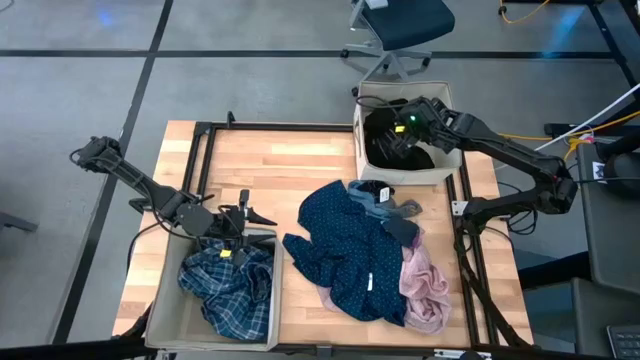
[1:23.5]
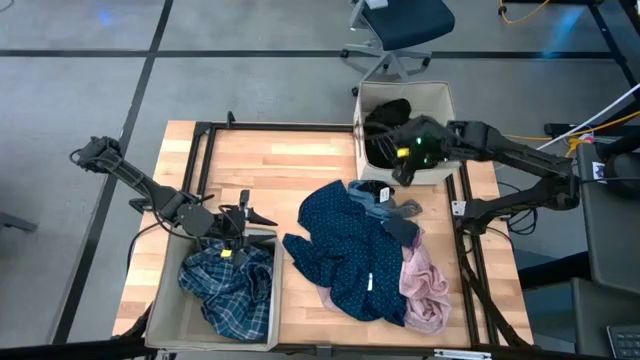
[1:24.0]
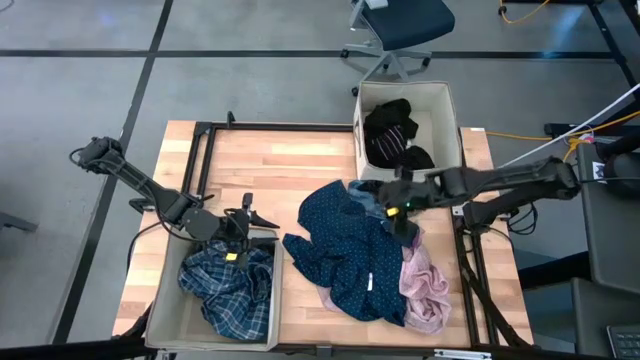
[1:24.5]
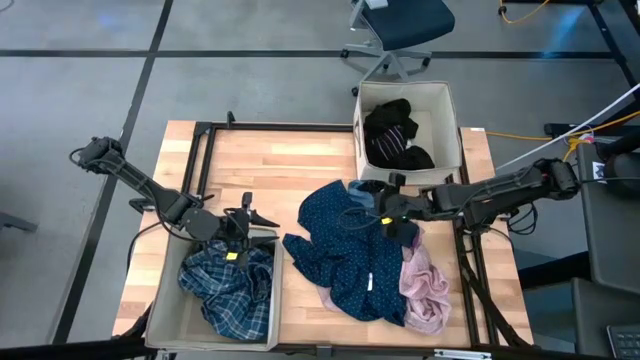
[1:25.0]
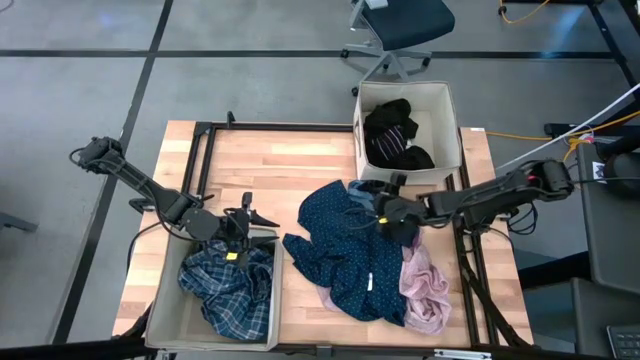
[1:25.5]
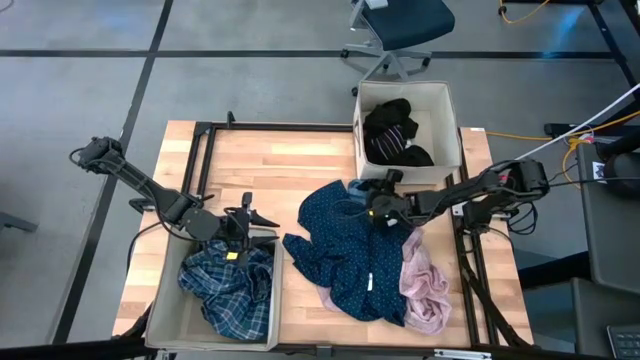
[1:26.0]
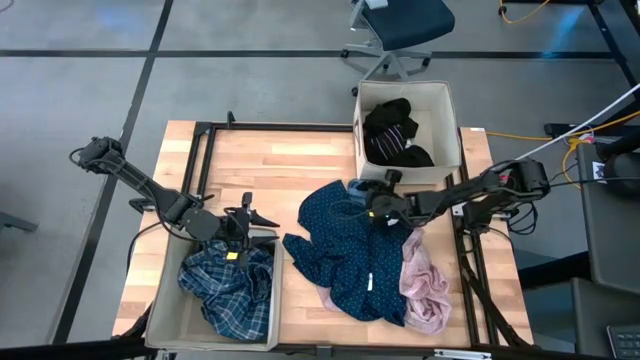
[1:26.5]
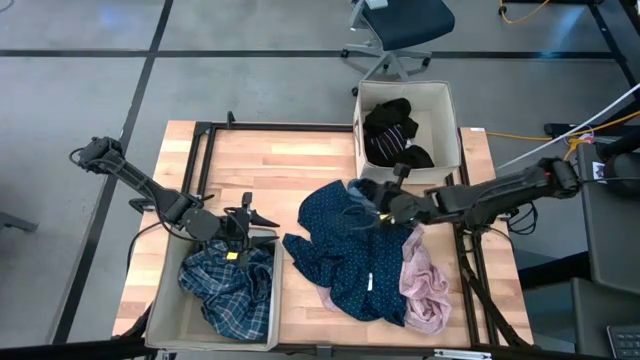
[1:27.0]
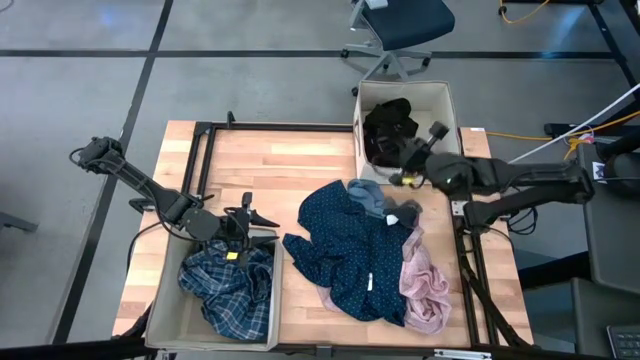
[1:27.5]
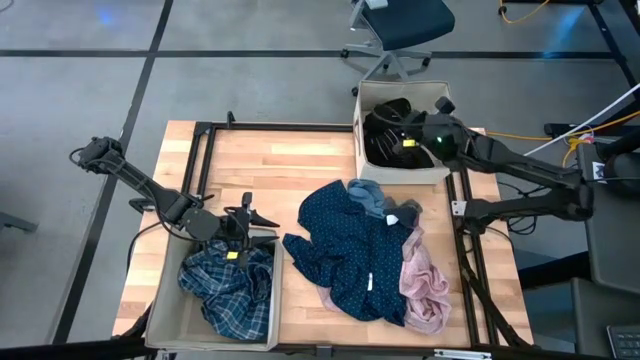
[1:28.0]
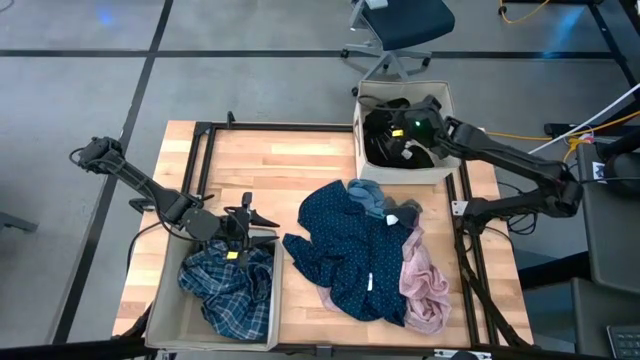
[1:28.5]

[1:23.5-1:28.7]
Task: Sort clothes
Put the black sock into the top laundry organizer

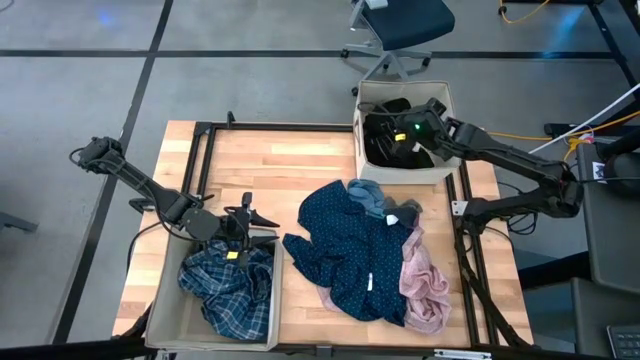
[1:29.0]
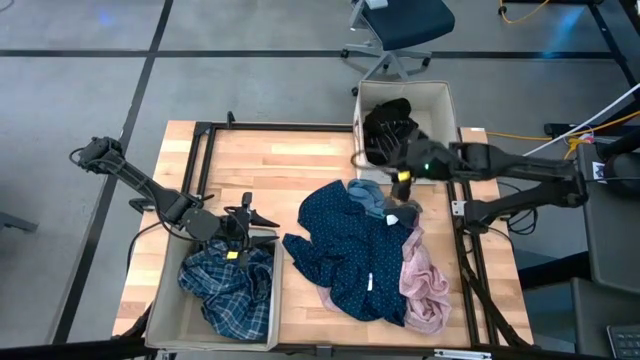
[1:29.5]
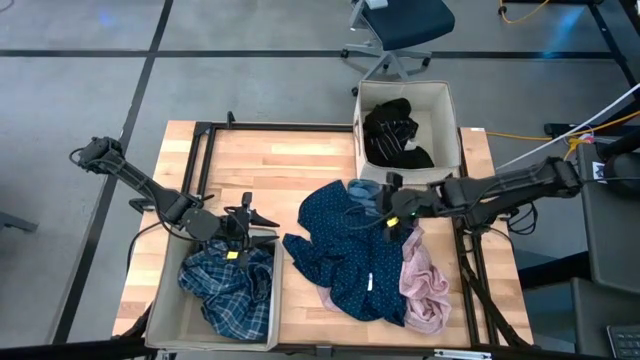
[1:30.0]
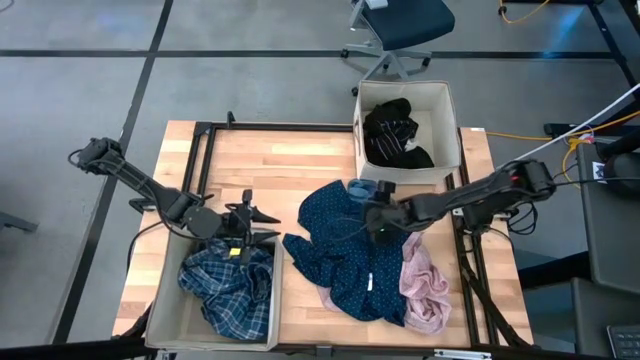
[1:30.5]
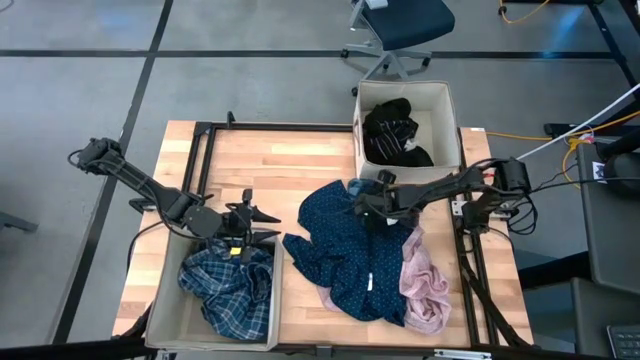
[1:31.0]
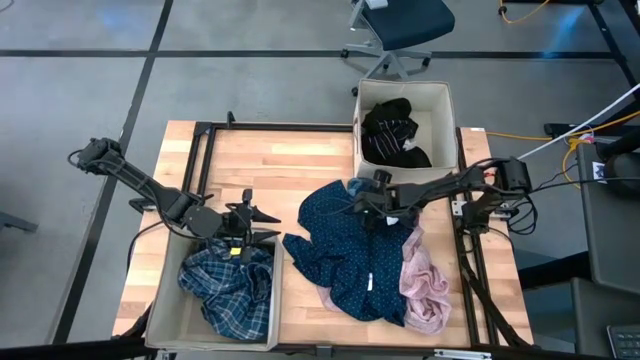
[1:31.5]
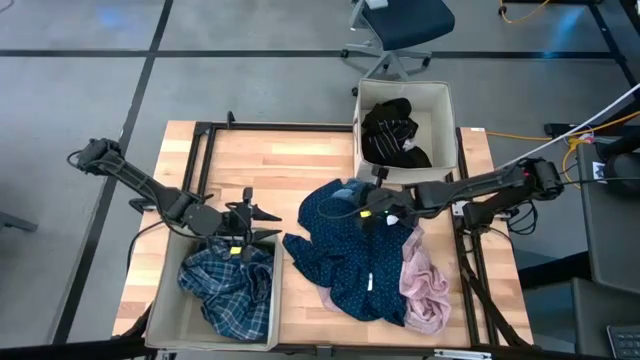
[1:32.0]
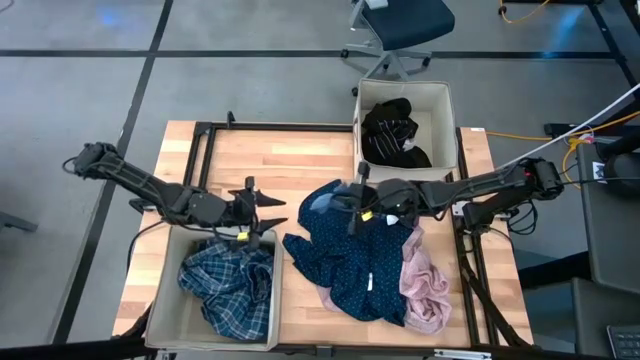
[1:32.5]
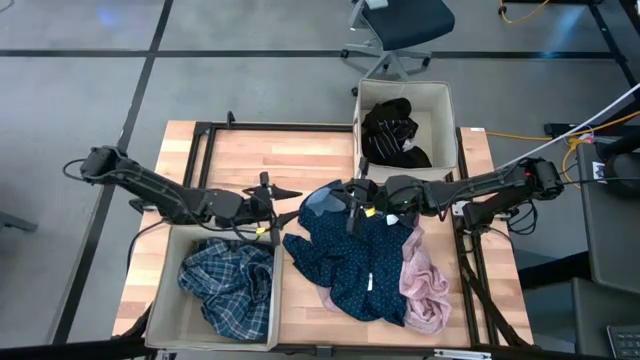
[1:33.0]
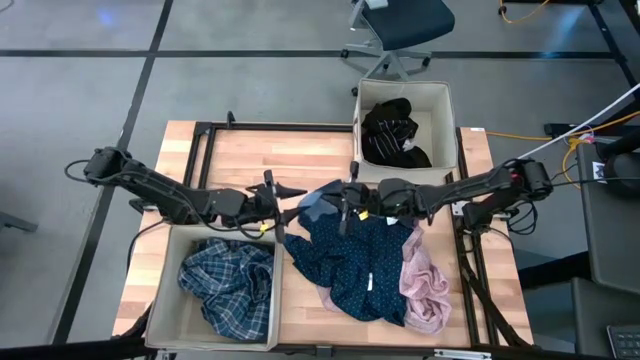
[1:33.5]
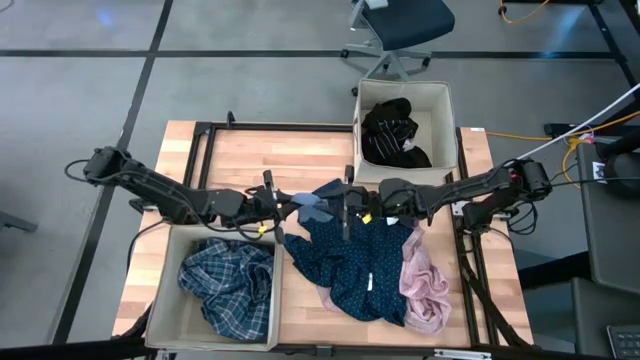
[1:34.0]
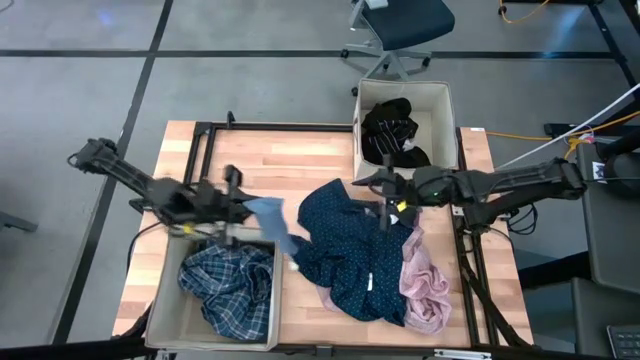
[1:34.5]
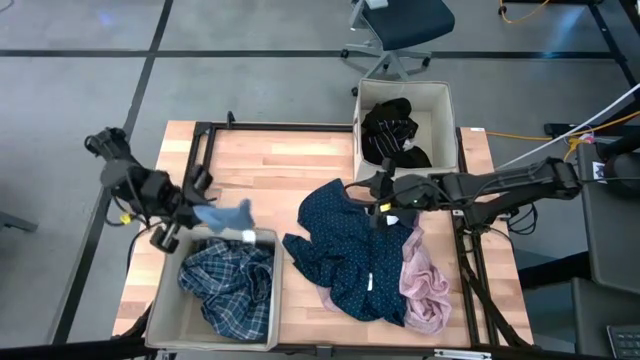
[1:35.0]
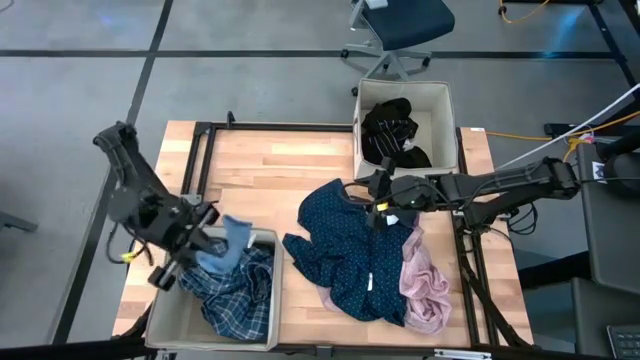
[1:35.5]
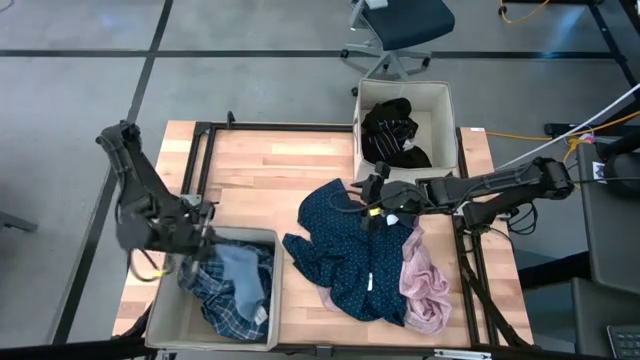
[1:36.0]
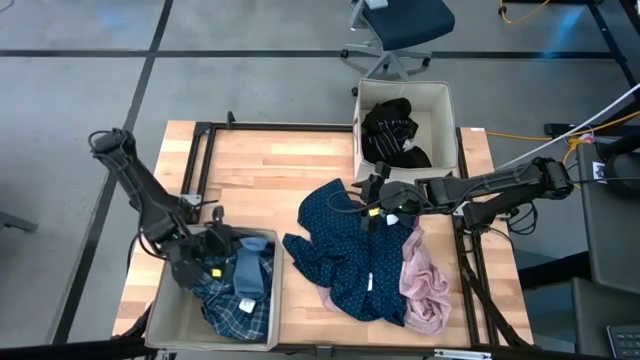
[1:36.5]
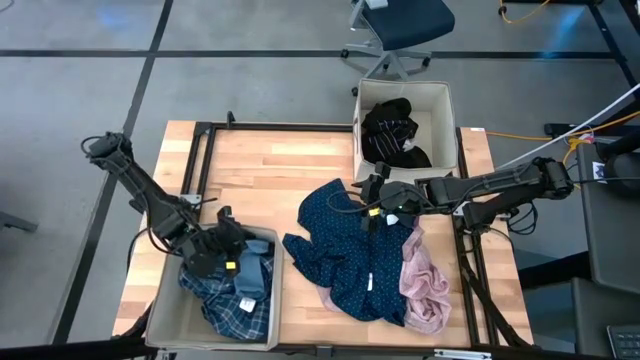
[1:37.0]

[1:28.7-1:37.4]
Put the blue sock into the bottom laundry organizer

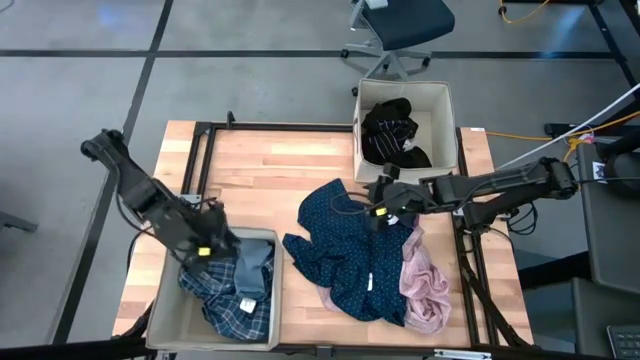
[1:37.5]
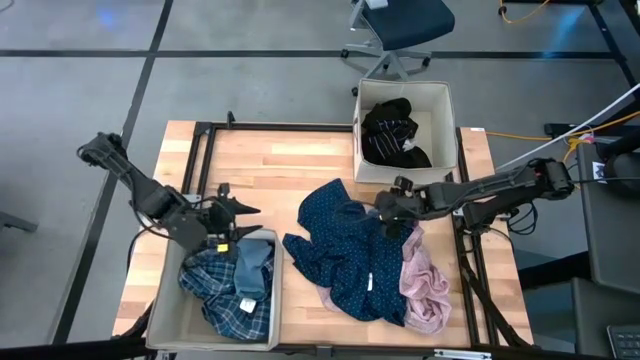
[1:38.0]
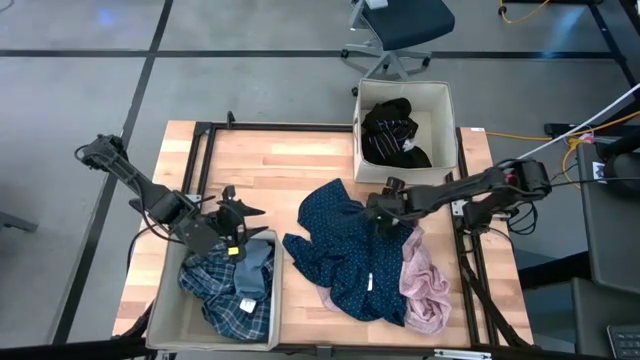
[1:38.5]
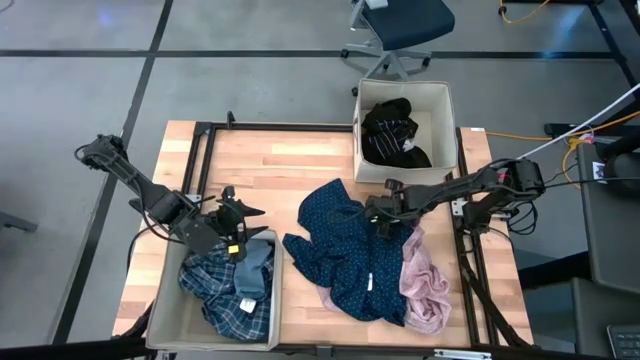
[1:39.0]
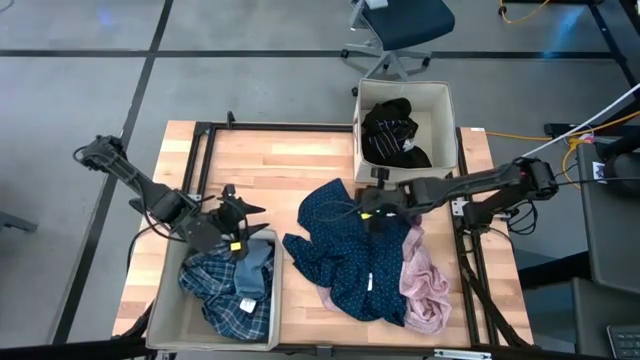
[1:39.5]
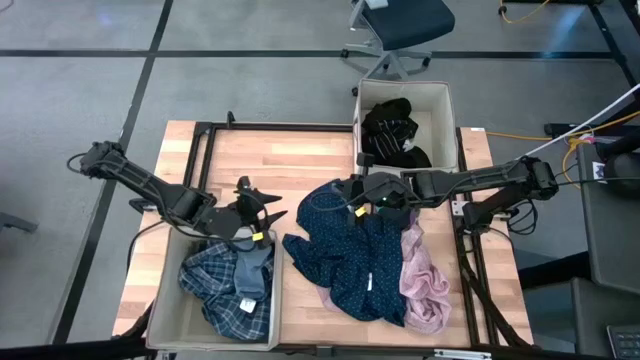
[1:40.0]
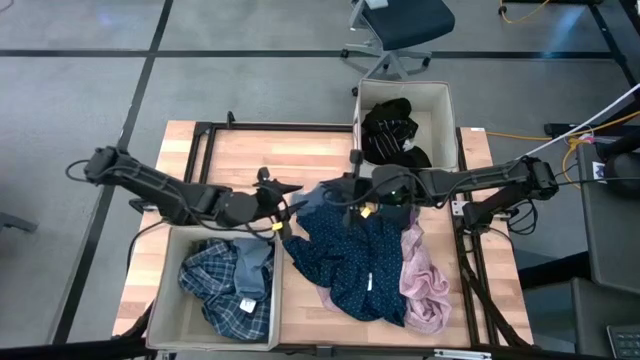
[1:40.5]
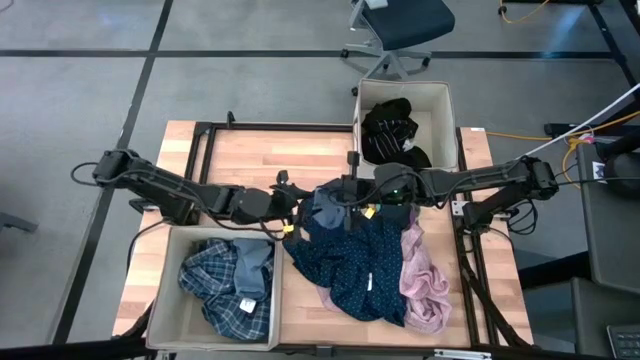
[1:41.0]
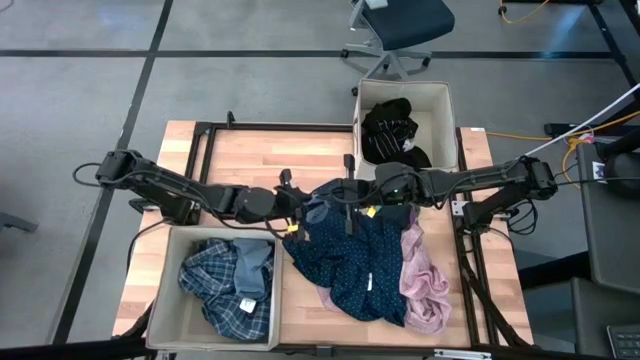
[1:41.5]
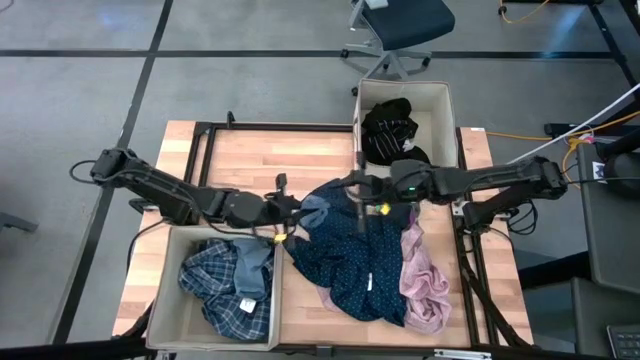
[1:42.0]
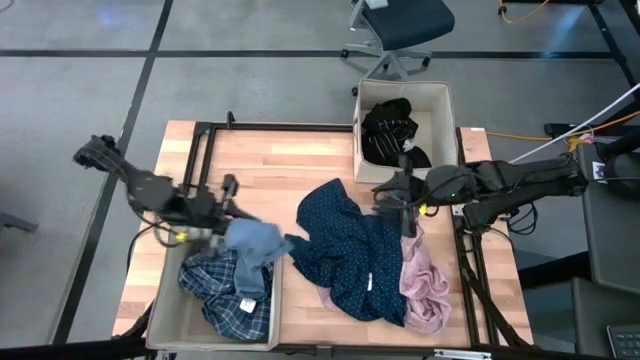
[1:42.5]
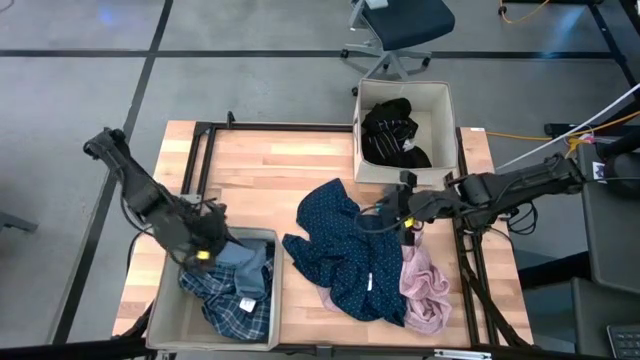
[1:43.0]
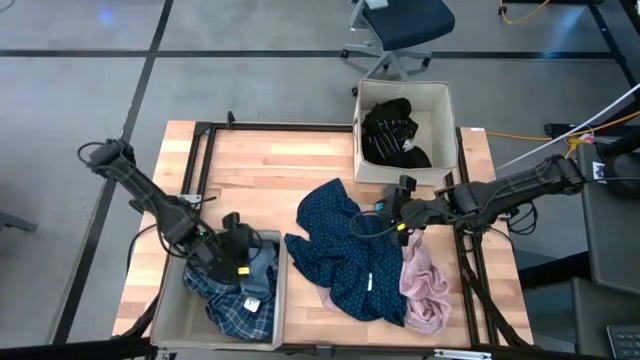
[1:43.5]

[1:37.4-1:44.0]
Put the blue sock into the bottom laundry organizer

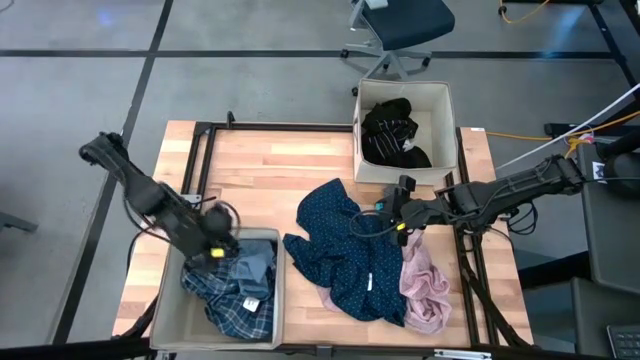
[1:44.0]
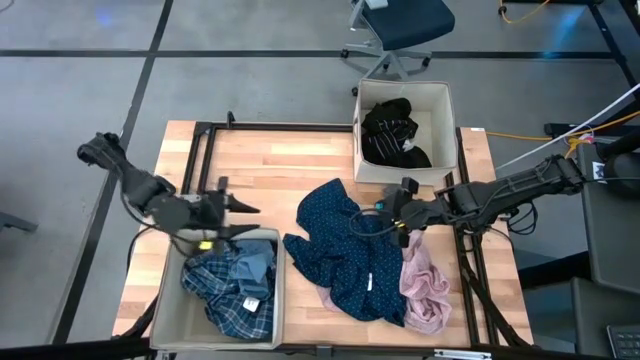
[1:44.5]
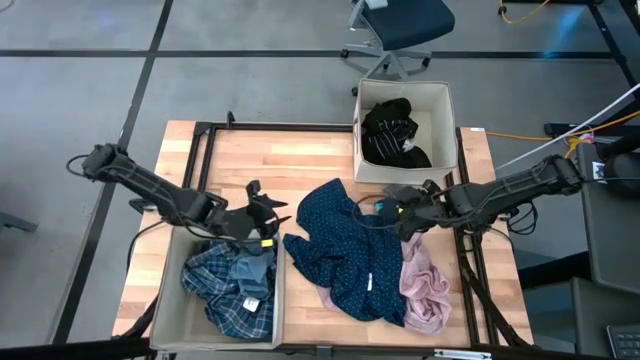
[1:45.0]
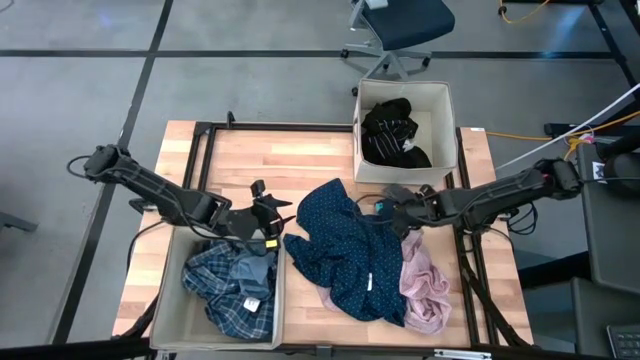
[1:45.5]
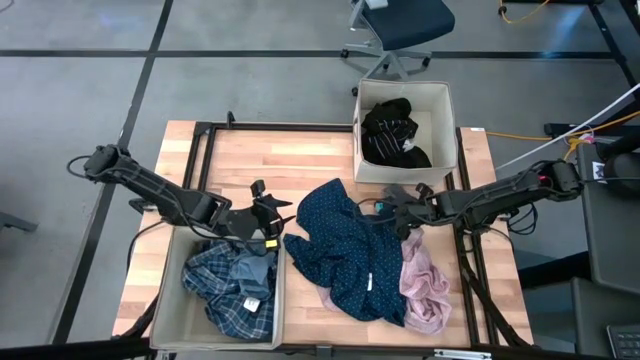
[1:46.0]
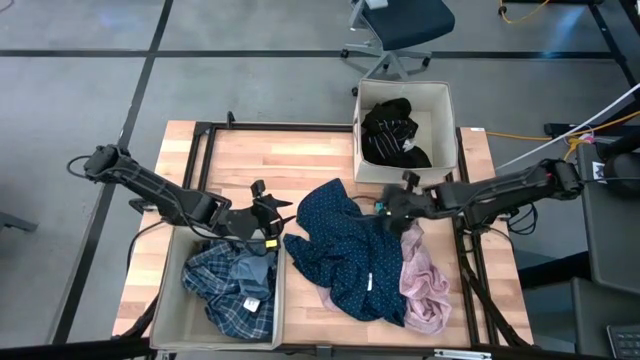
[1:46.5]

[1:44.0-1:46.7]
Put the gray sock into the bottom laundry organizer
